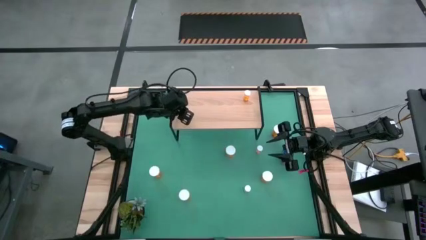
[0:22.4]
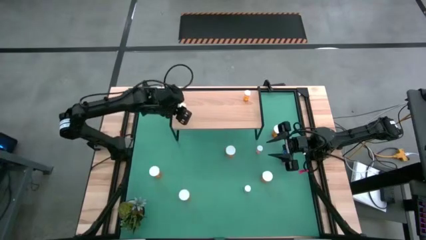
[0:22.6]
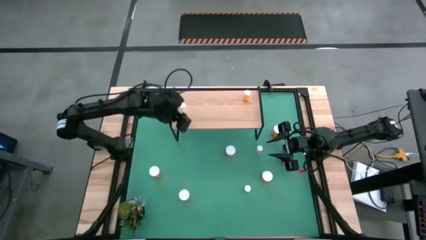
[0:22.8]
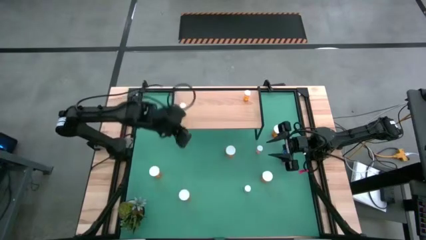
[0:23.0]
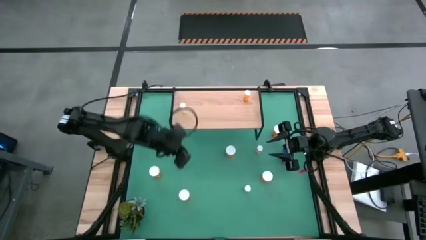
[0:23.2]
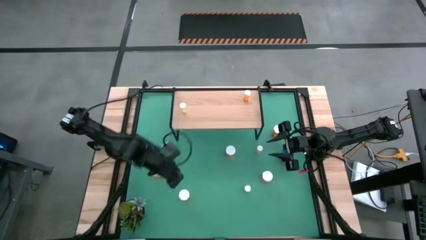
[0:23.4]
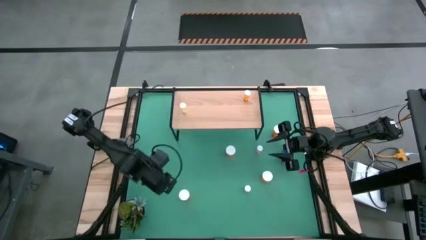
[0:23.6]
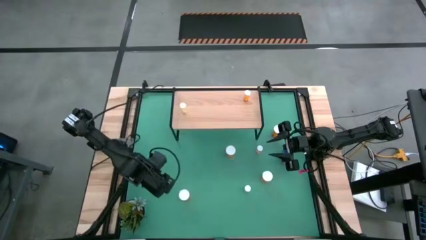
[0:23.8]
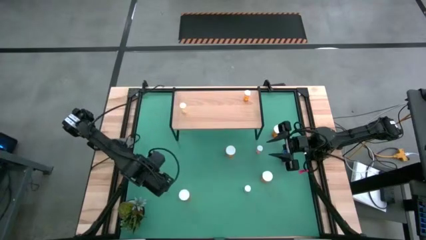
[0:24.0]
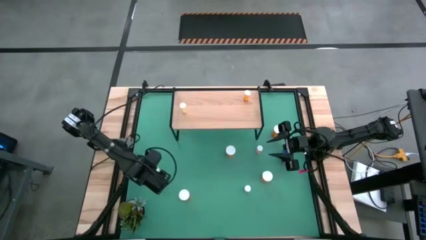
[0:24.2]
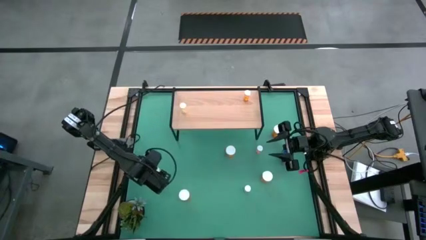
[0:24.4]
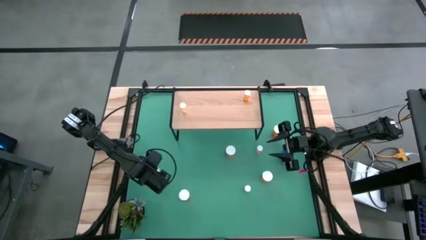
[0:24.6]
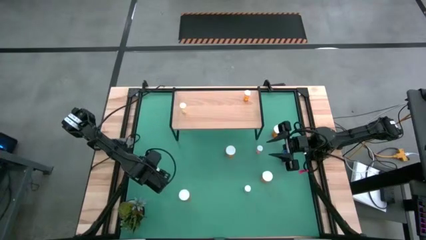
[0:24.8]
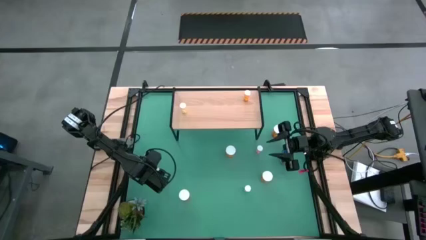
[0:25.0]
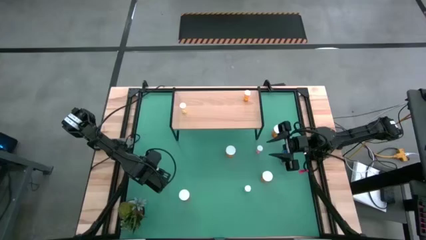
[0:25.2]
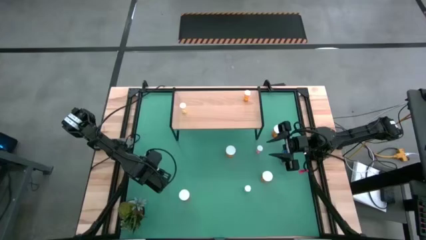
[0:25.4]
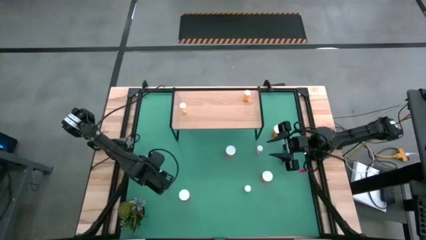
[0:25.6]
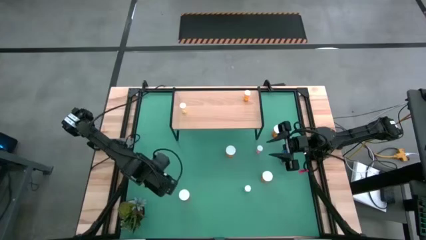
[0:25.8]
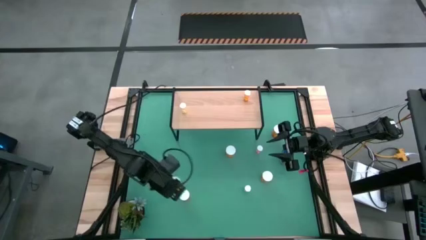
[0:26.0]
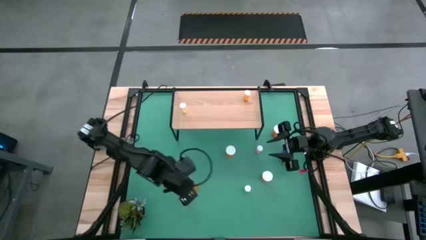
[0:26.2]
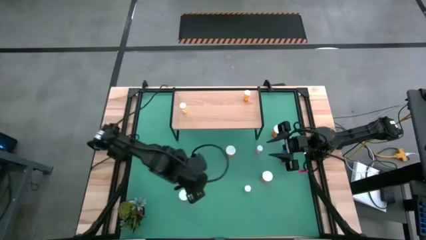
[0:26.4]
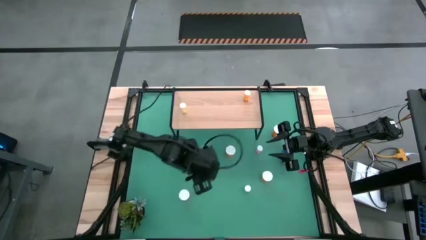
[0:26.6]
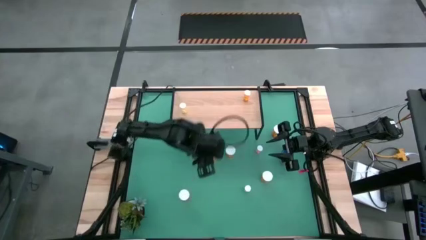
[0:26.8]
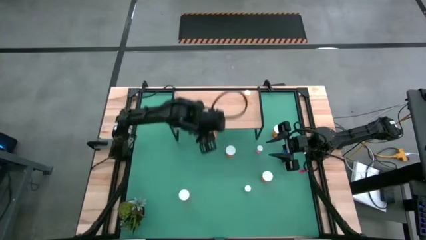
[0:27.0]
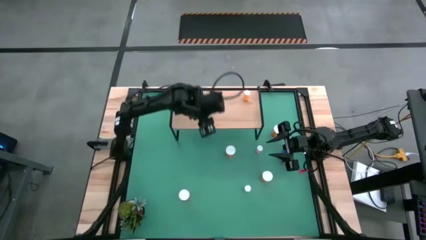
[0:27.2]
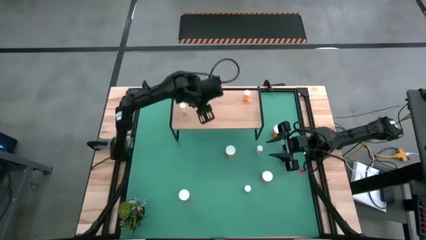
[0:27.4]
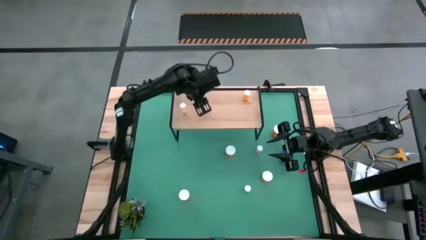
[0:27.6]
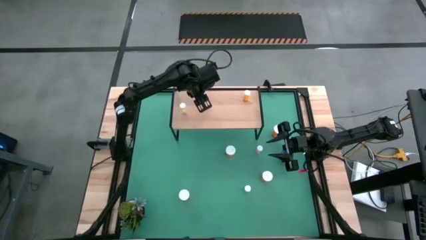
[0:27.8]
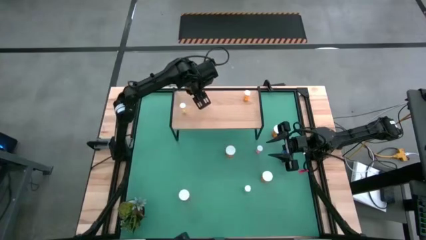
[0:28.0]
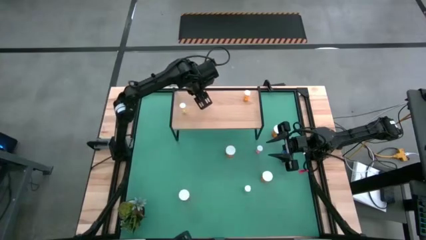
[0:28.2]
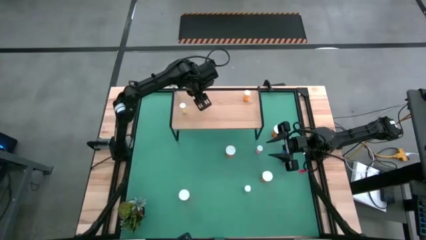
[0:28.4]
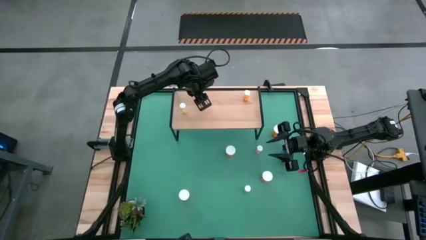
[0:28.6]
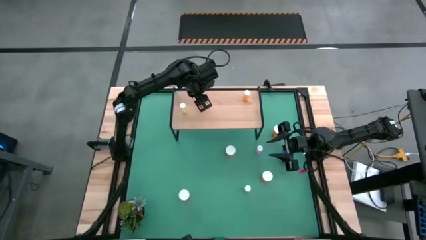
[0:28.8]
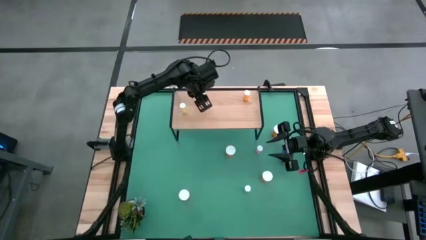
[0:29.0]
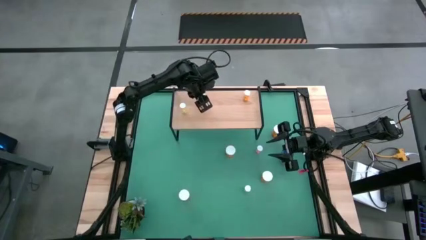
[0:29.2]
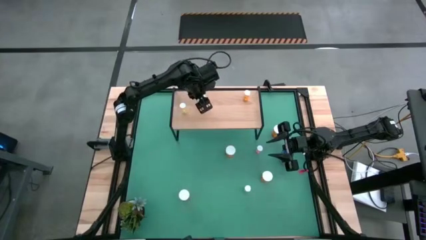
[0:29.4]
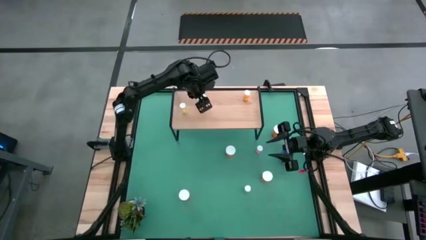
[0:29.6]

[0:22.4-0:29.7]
Task: Pick and place medicine bottles onto shelf by color
Put the big orange pill bottle on the shelf

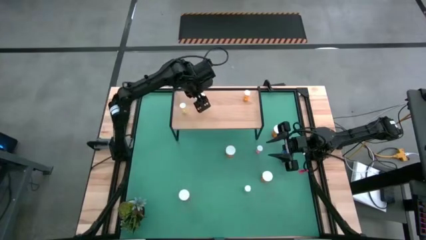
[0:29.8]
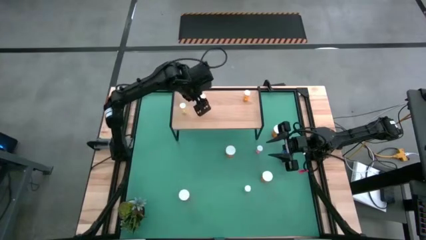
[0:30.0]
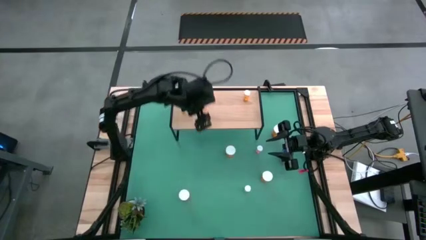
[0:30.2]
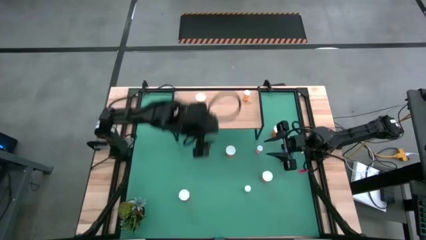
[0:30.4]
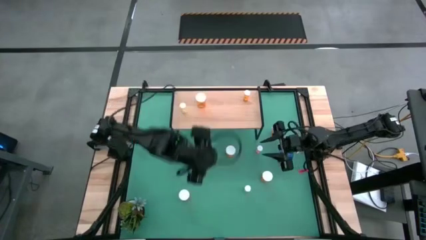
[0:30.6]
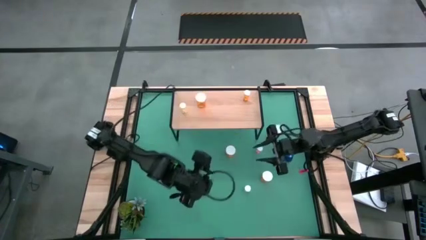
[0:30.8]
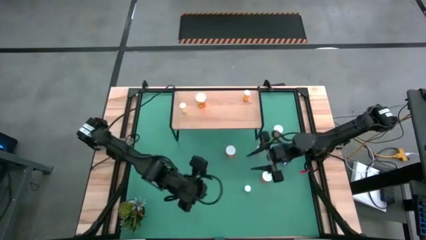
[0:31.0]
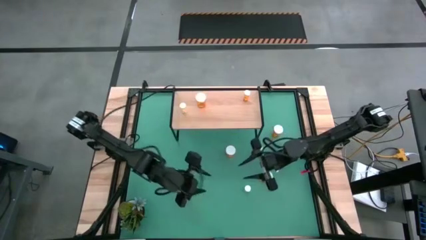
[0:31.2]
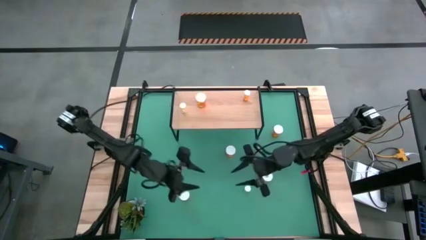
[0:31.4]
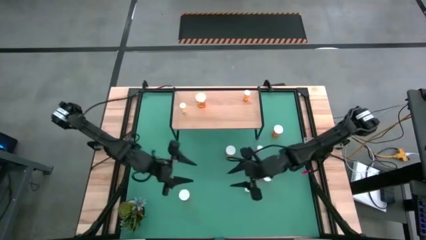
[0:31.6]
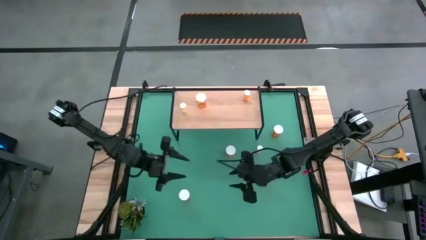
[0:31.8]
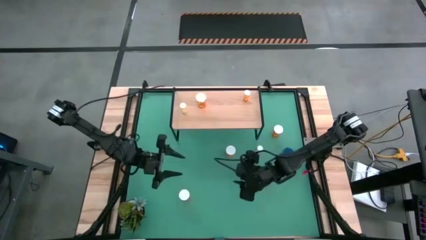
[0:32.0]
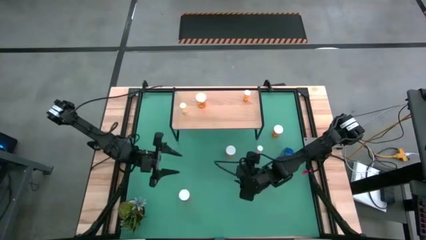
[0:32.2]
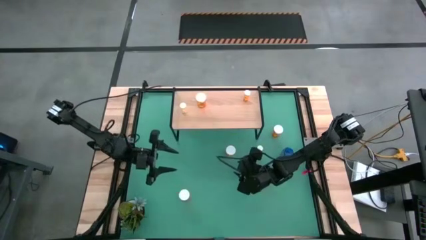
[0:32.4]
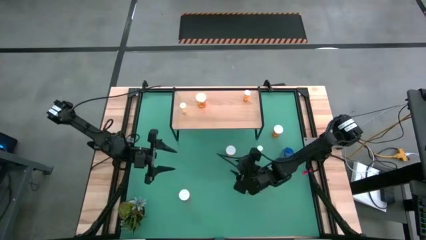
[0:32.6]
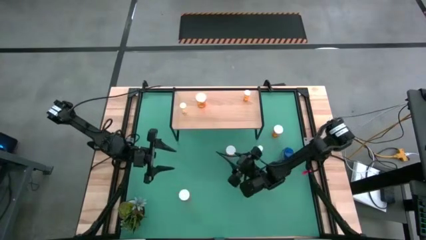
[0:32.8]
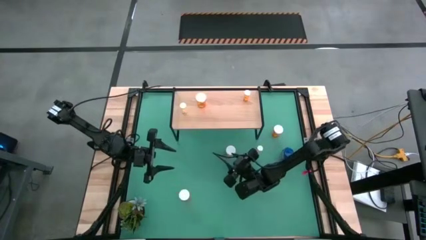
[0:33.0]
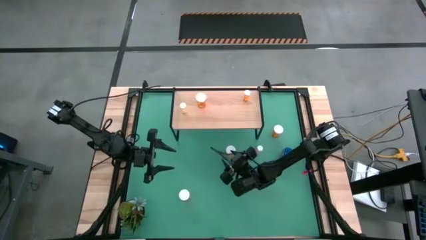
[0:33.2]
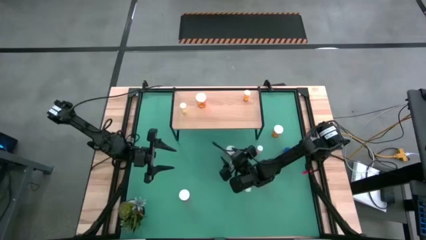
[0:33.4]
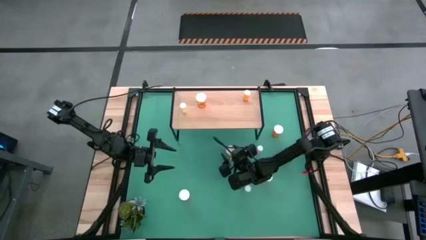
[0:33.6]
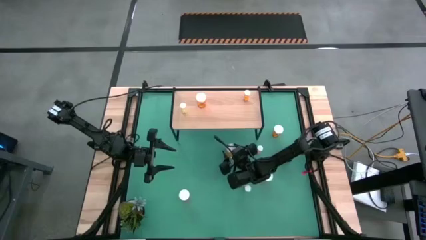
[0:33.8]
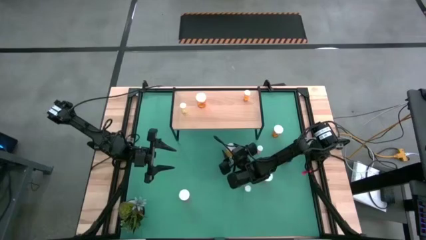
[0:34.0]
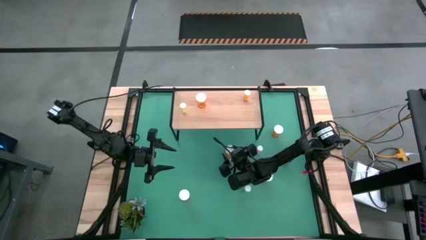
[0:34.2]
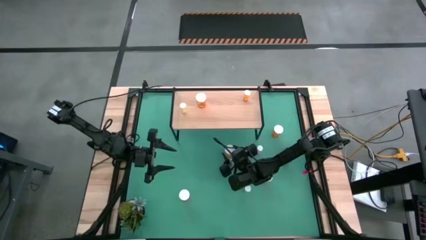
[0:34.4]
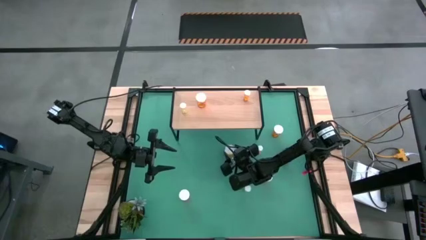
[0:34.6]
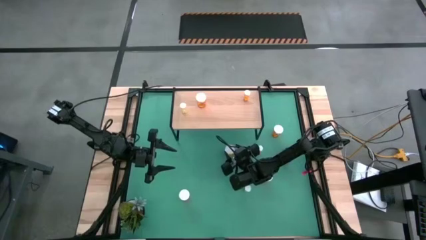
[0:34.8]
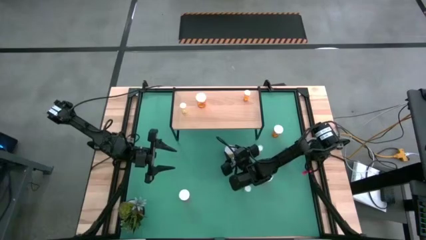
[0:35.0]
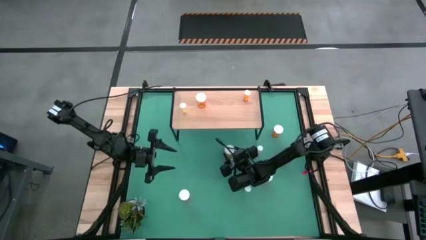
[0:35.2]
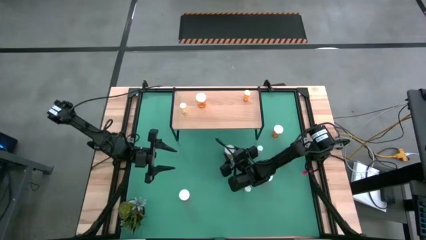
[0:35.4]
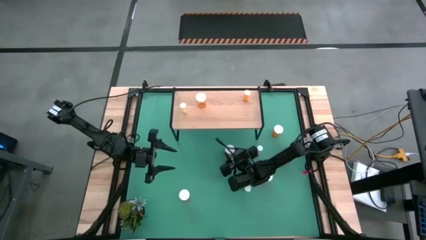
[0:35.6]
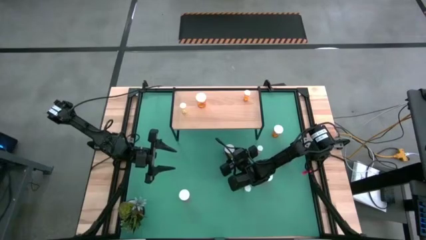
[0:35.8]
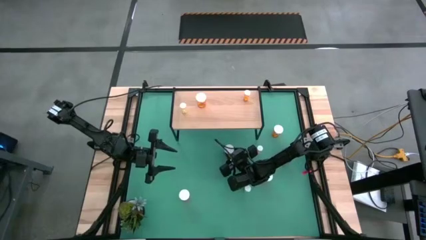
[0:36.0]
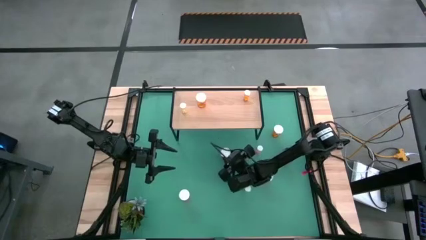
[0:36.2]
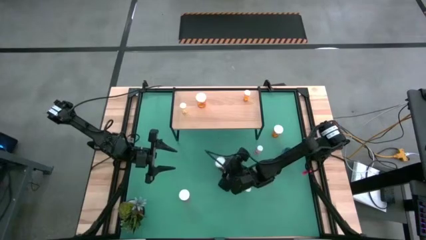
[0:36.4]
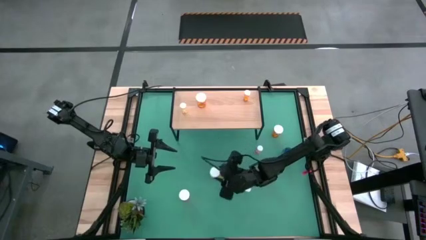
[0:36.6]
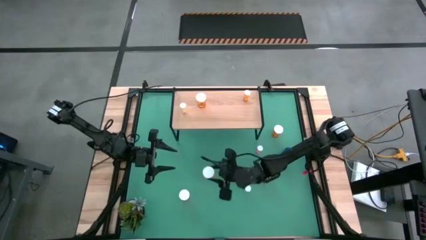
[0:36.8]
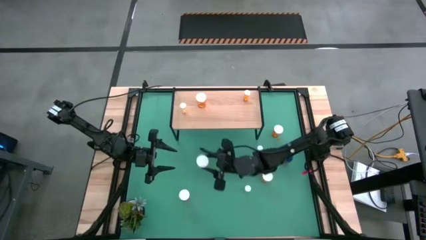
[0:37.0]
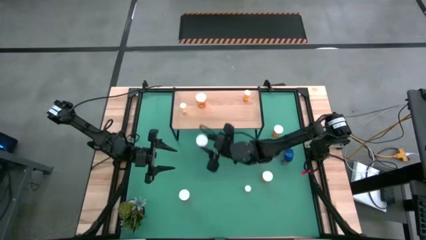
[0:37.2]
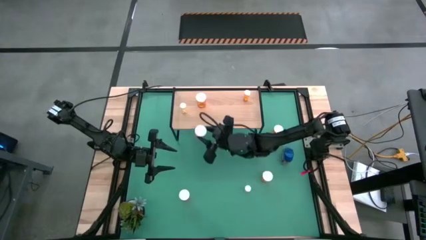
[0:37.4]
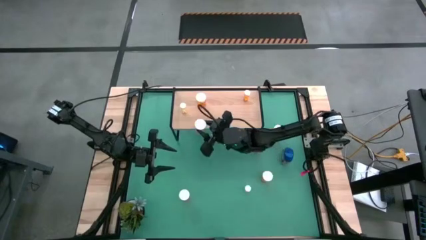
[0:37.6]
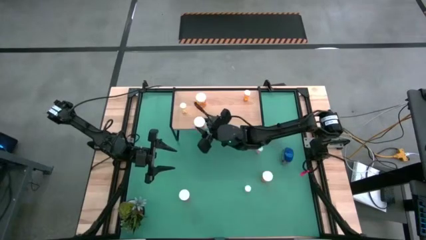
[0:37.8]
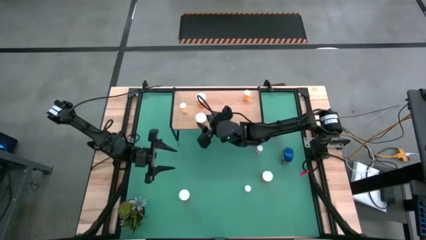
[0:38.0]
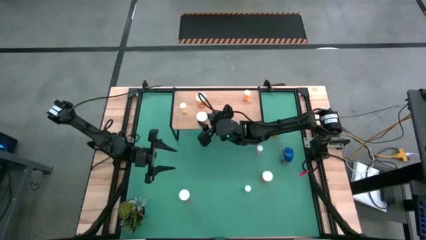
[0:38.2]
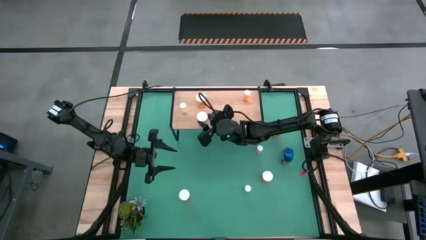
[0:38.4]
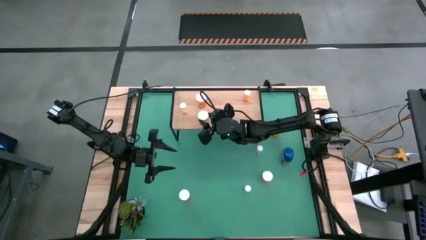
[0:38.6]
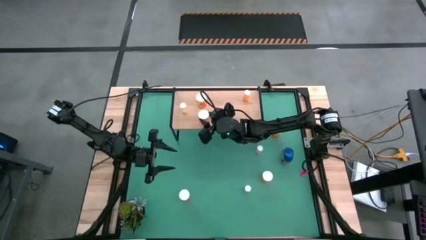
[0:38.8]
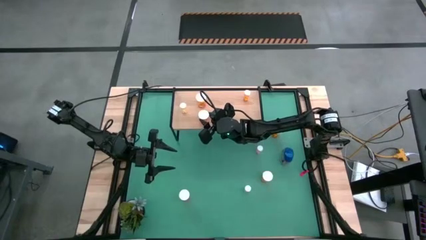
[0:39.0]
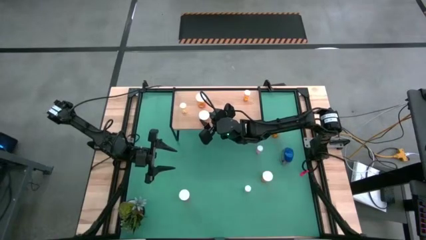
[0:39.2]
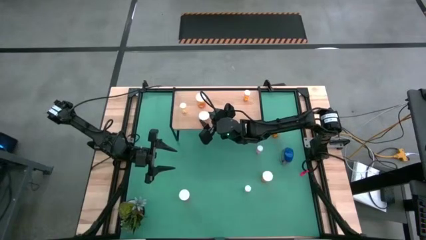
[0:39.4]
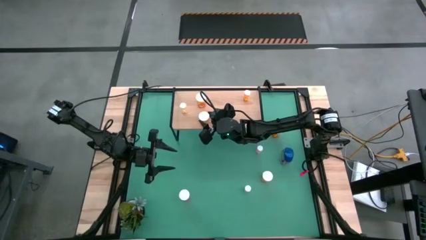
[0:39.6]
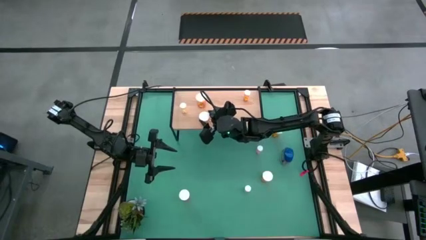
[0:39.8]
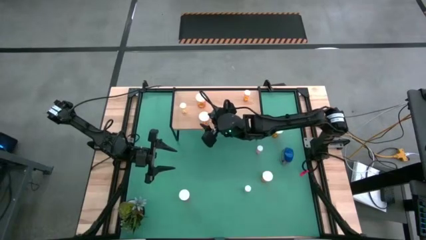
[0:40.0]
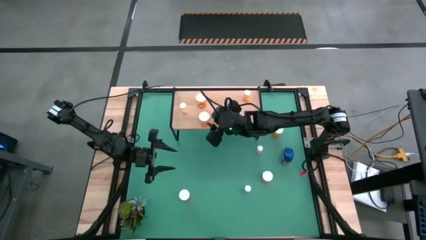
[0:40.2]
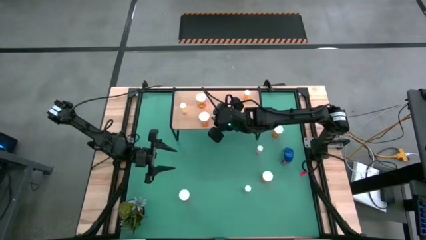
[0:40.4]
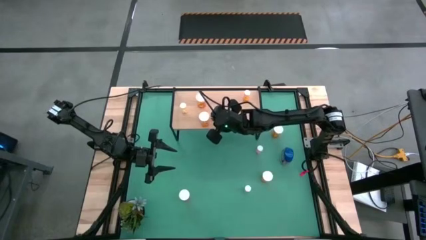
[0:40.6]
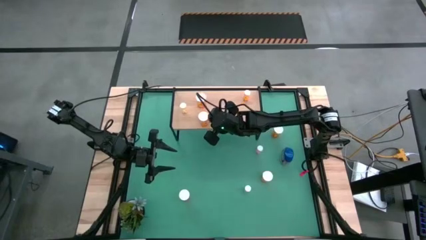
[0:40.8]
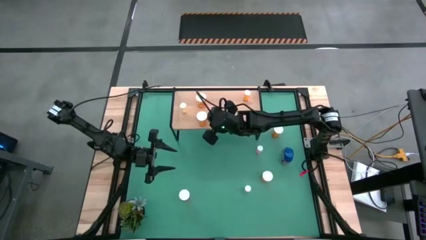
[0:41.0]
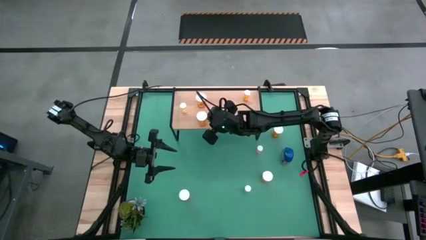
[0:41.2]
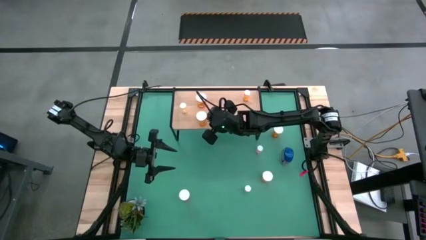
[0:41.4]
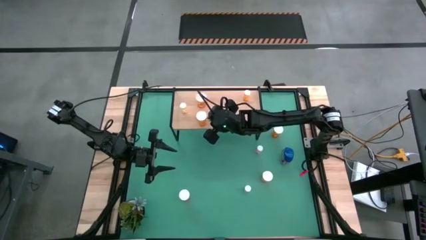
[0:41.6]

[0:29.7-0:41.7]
Put the big orange pill bottle on the shelf
